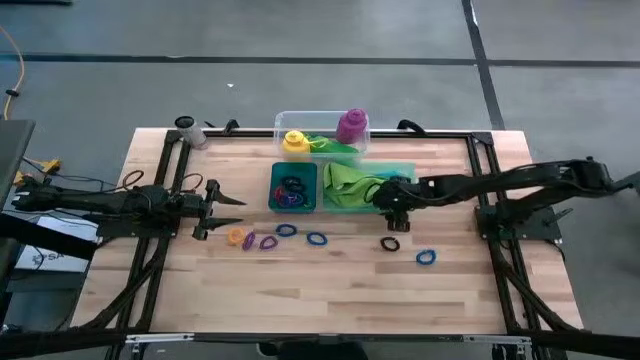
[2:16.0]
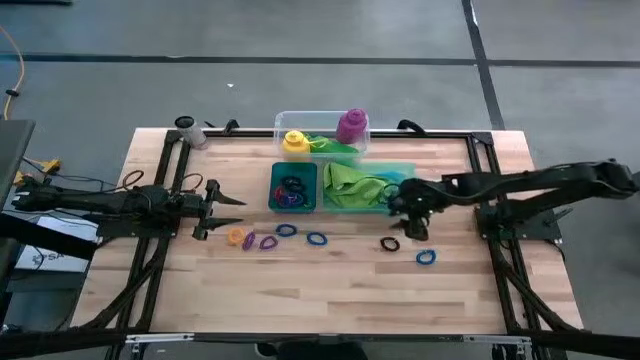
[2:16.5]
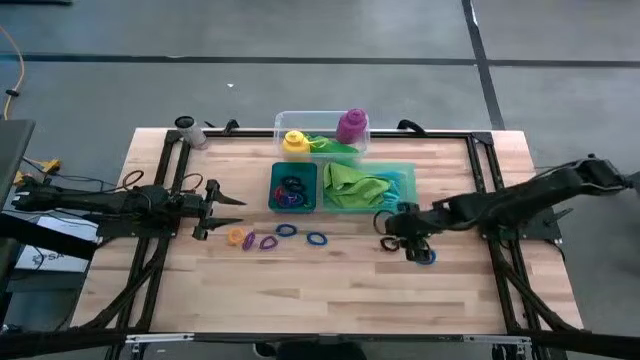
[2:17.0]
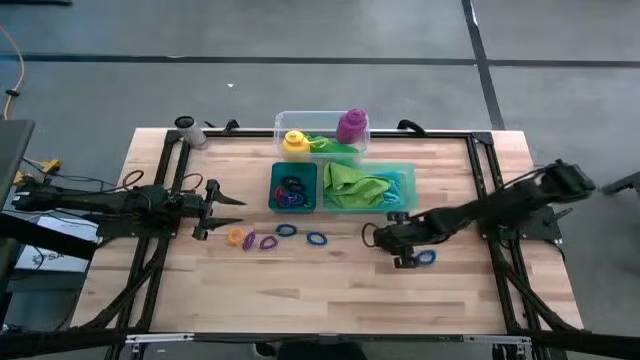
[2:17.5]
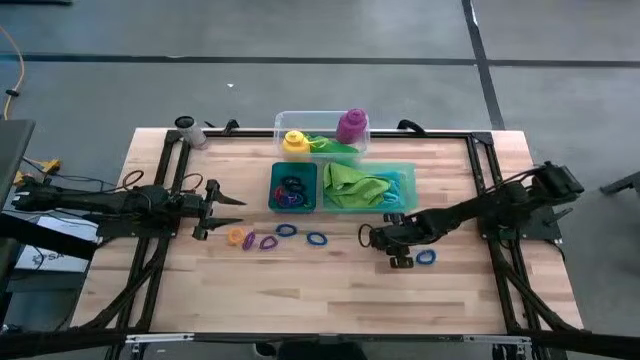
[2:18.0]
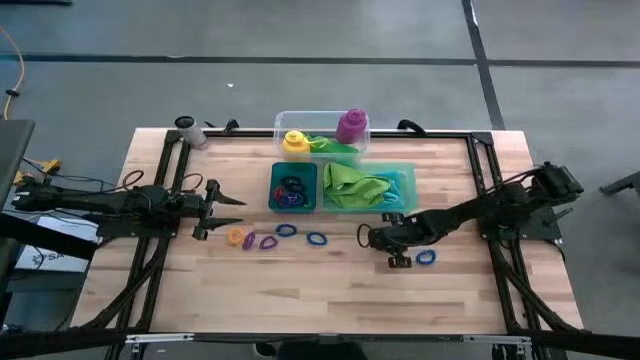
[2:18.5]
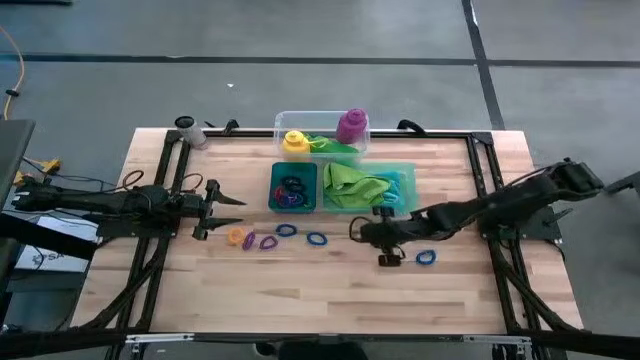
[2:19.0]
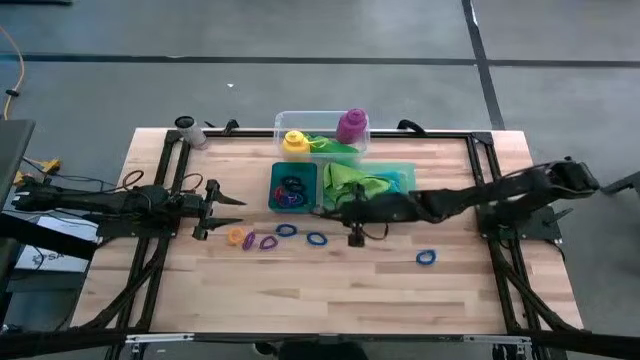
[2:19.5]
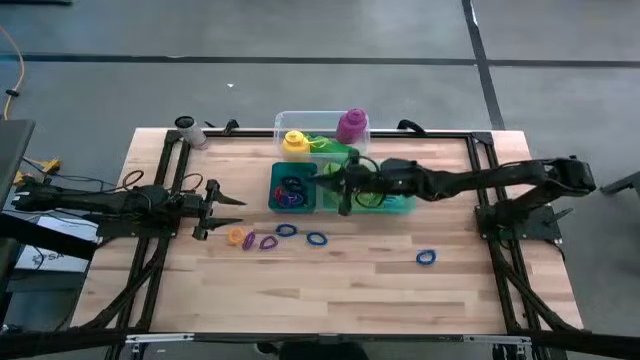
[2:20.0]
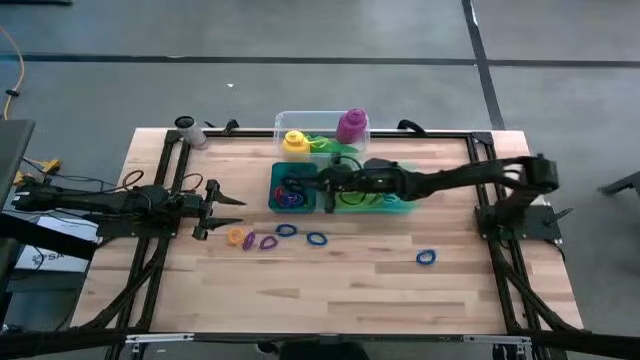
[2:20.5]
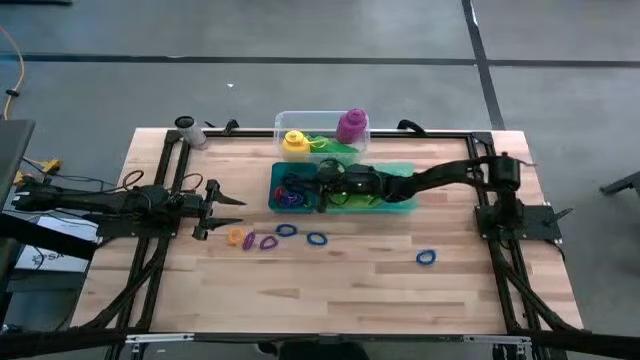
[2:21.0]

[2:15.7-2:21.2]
Task: Pick & Place Sports Items
Put the black spring keychain into the blue bin

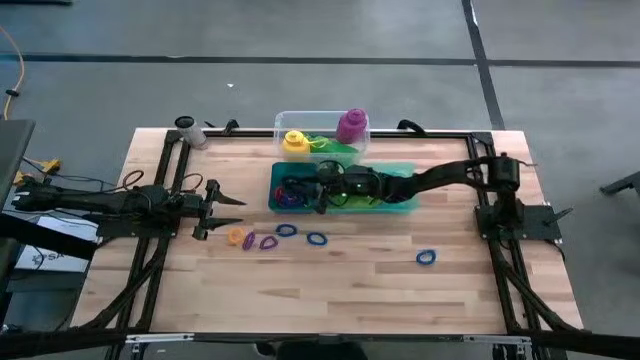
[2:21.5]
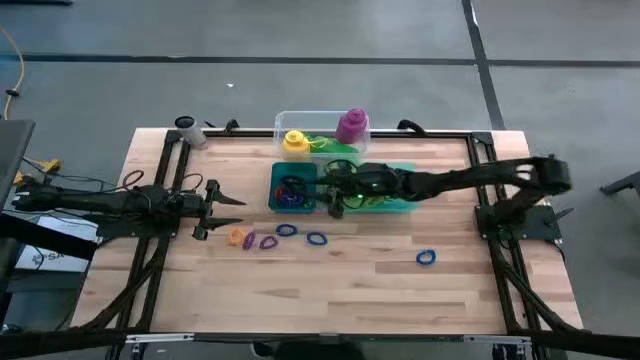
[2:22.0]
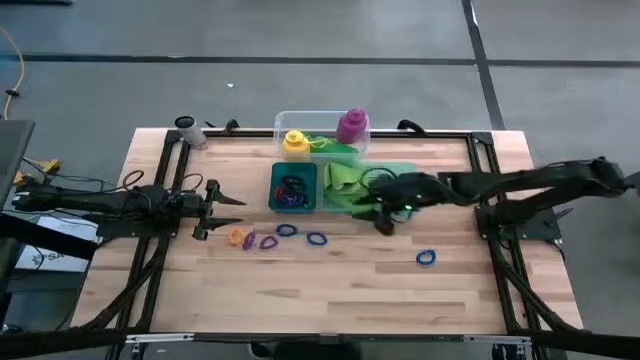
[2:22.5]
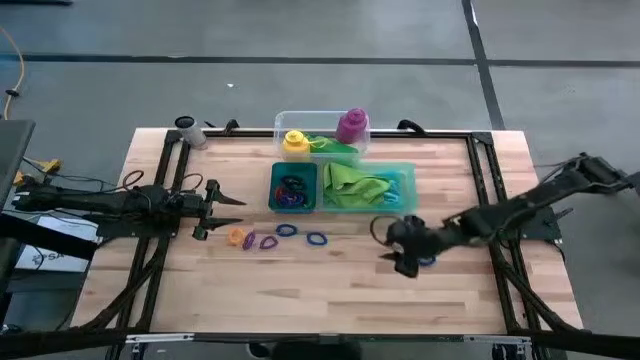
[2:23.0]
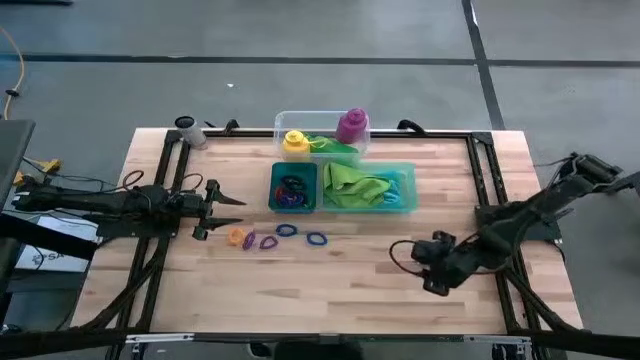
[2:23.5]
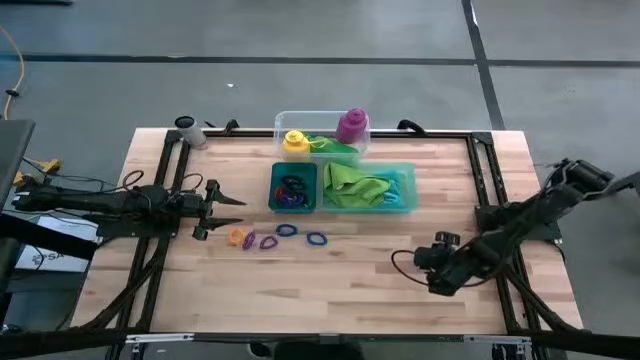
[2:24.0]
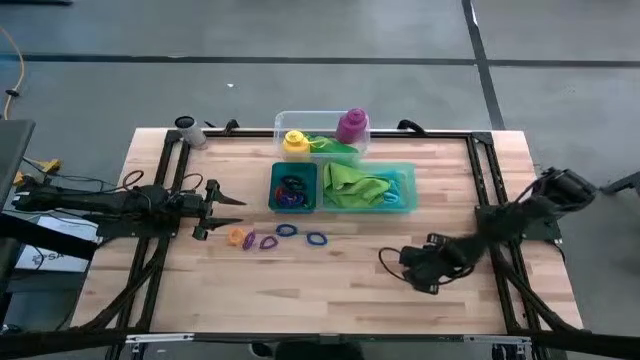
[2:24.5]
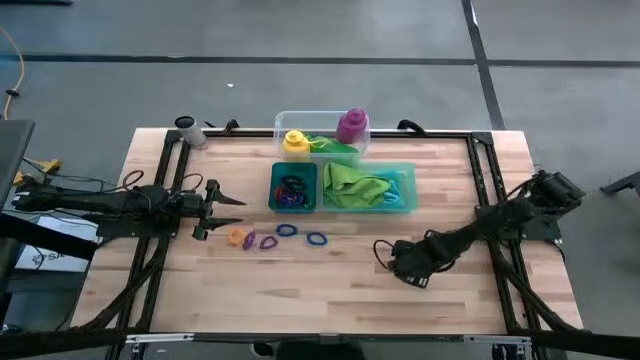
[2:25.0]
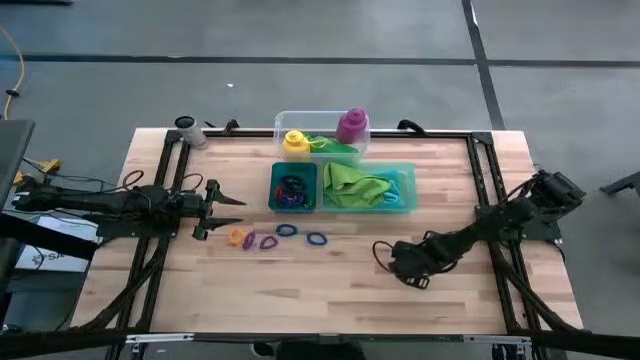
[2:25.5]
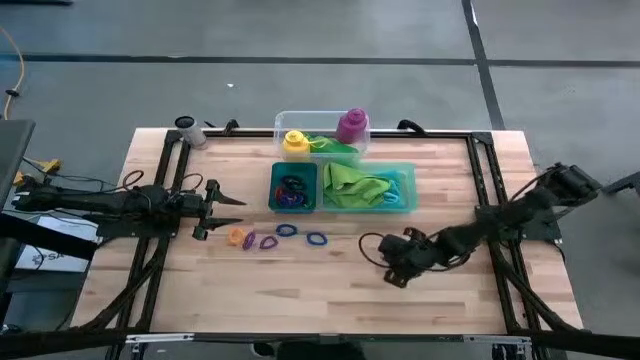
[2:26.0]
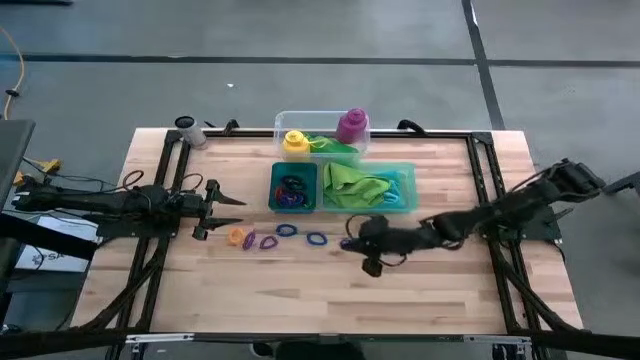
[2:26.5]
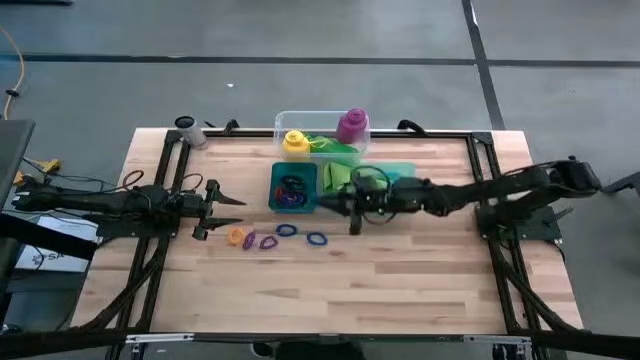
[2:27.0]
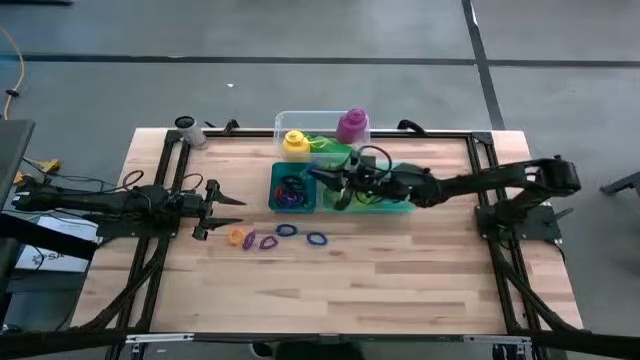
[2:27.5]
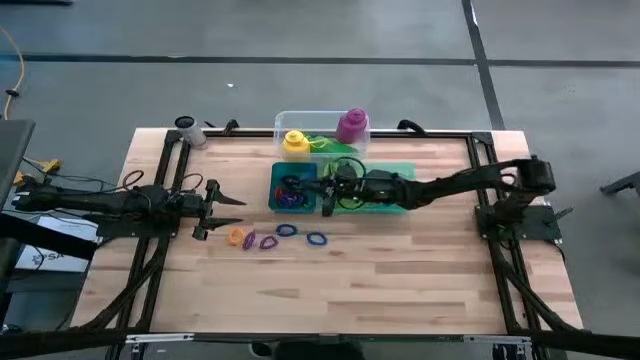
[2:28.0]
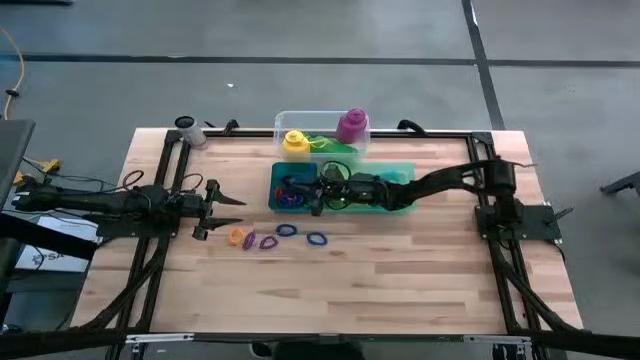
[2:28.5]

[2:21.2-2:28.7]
Put the bottom blue spring keychain into the blue bin

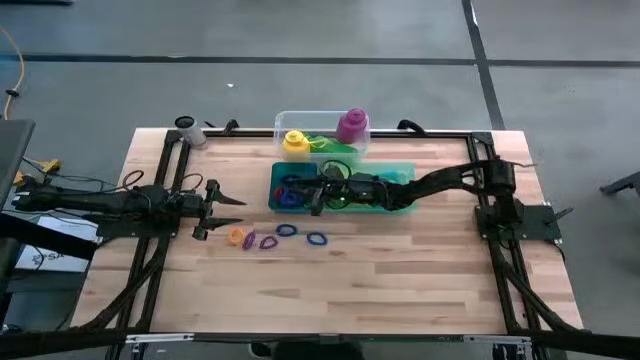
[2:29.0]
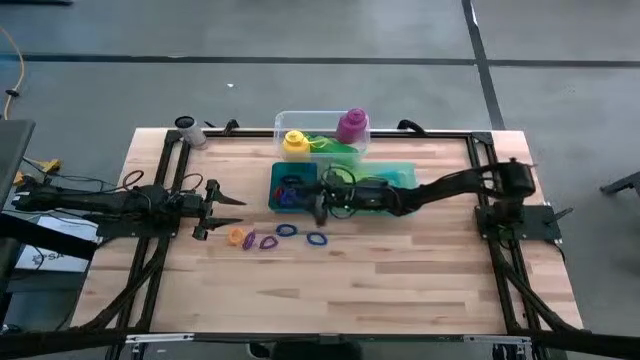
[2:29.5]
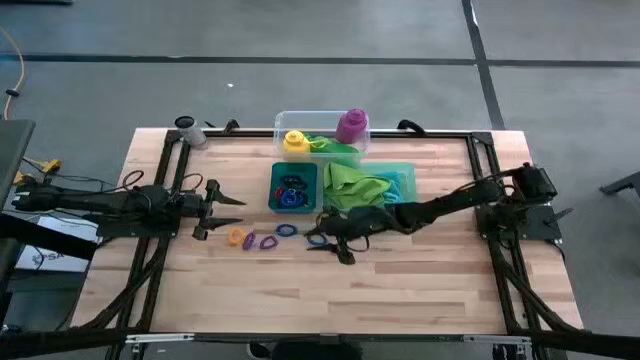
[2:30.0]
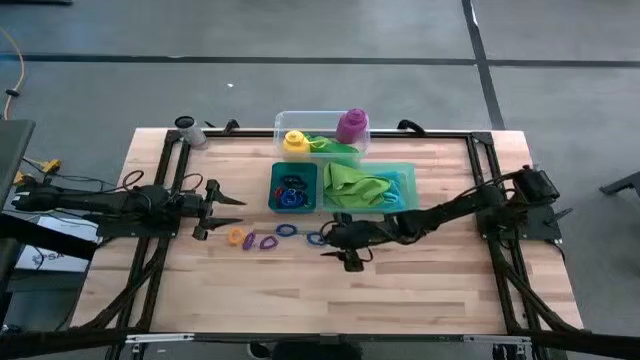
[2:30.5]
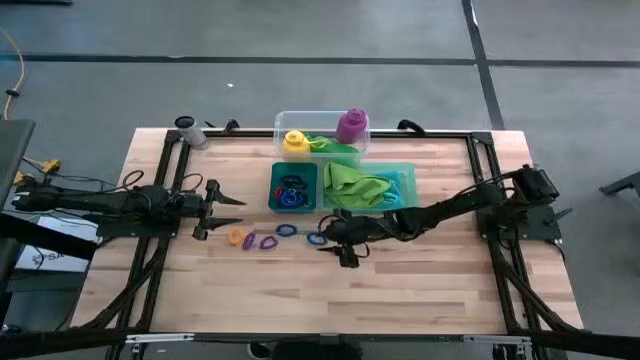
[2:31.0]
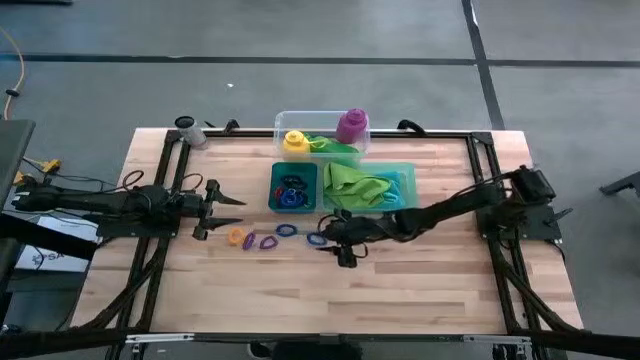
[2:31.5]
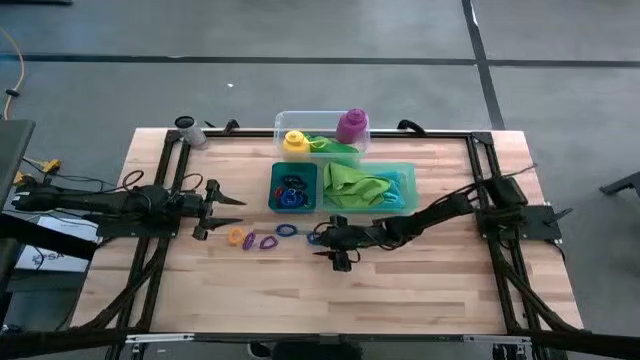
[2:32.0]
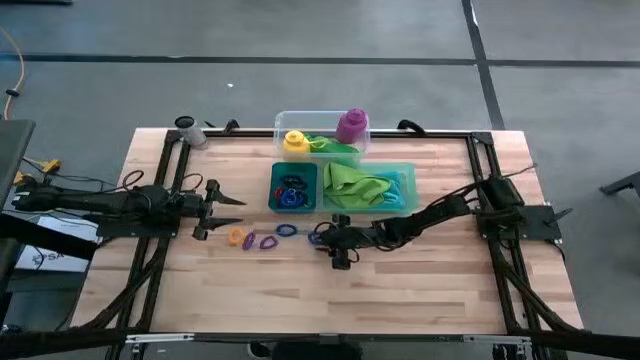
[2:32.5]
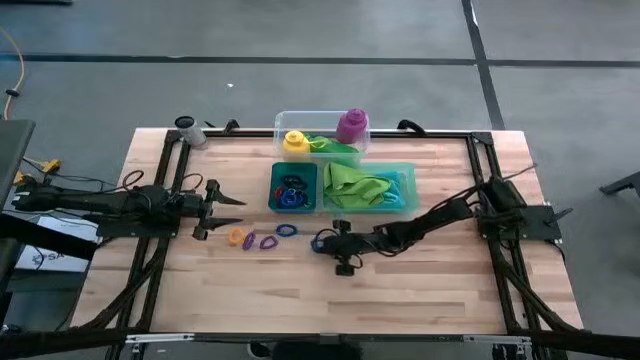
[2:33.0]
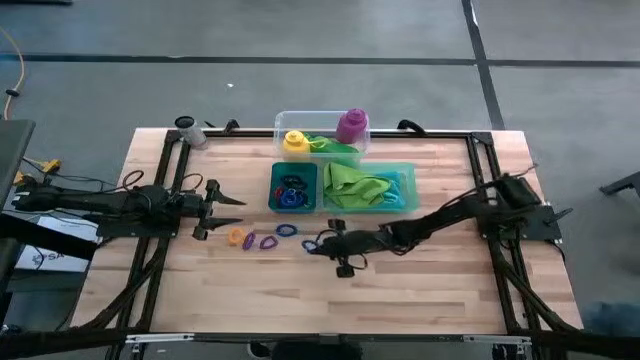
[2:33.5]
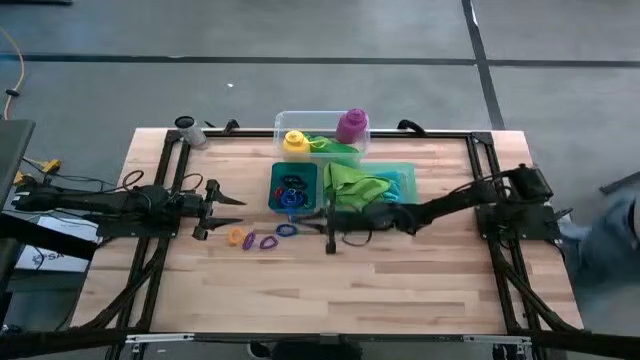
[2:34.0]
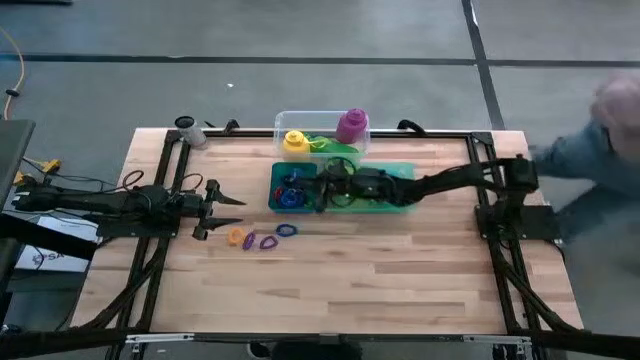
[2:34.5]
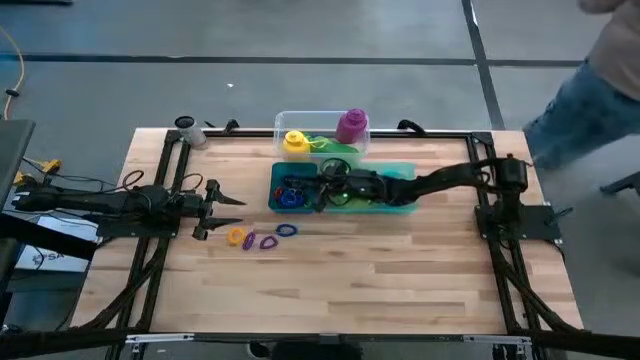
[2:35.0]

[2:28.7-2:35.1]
Put the right blue spring keychain into the blue bin
